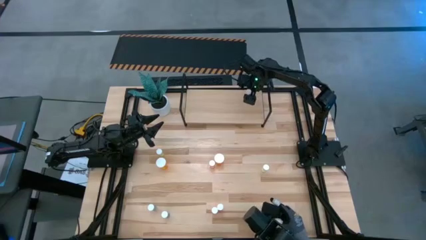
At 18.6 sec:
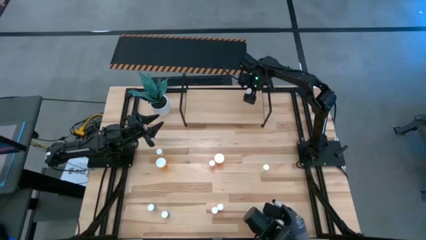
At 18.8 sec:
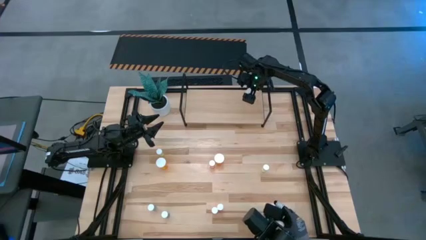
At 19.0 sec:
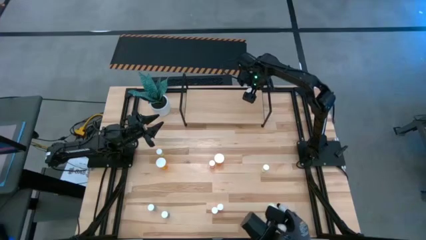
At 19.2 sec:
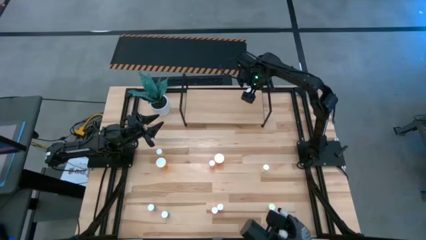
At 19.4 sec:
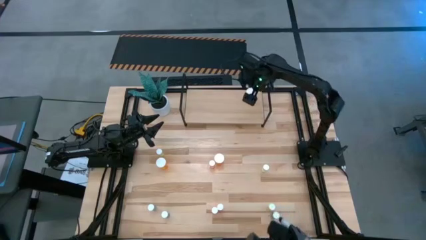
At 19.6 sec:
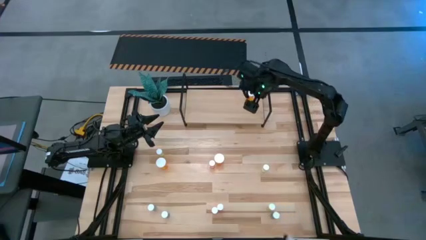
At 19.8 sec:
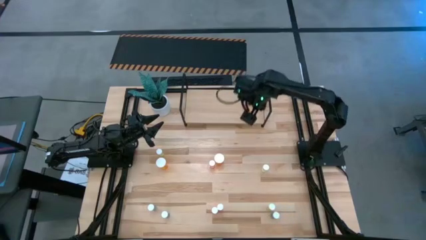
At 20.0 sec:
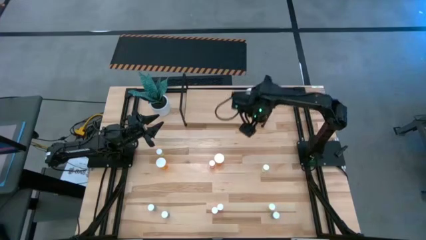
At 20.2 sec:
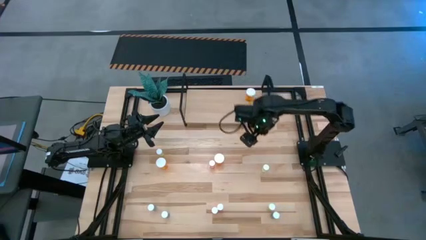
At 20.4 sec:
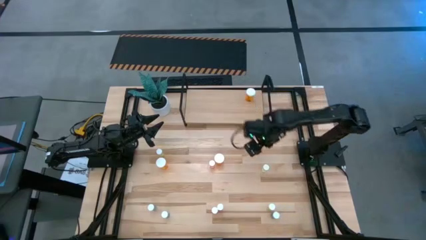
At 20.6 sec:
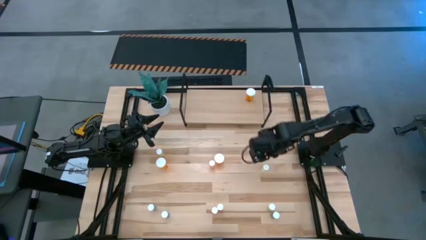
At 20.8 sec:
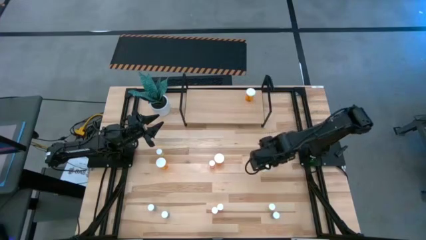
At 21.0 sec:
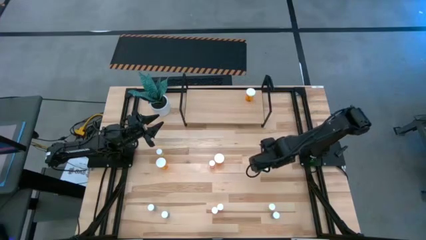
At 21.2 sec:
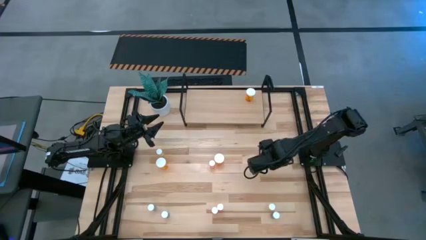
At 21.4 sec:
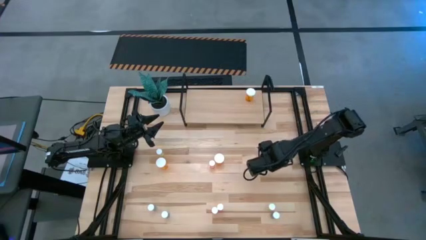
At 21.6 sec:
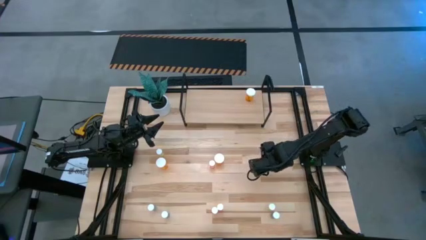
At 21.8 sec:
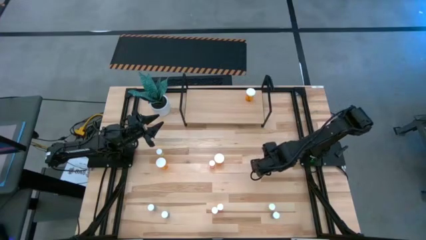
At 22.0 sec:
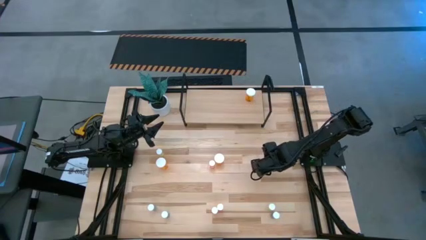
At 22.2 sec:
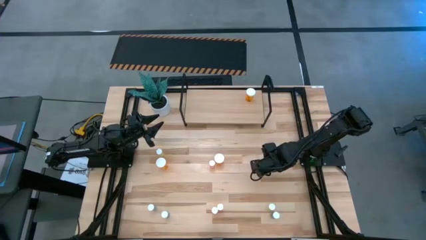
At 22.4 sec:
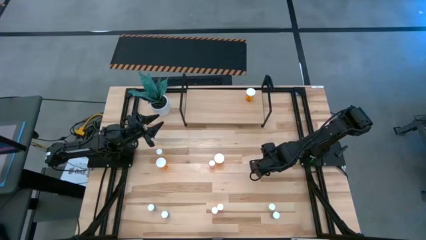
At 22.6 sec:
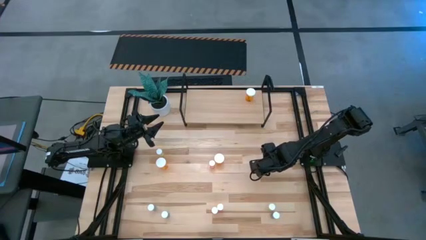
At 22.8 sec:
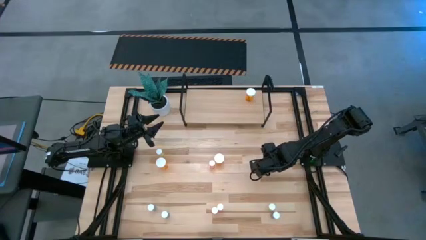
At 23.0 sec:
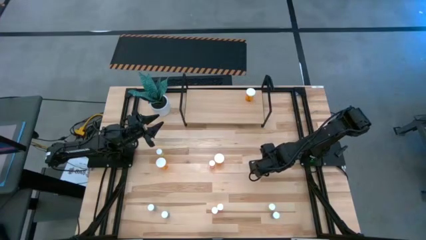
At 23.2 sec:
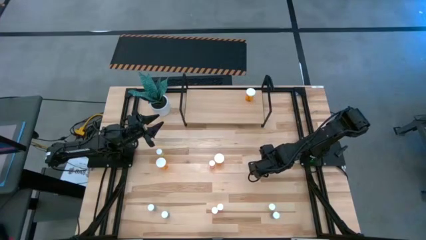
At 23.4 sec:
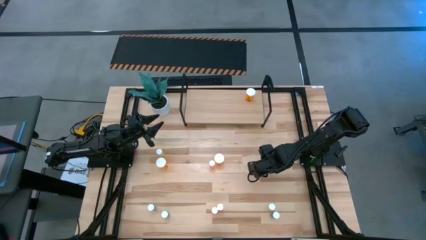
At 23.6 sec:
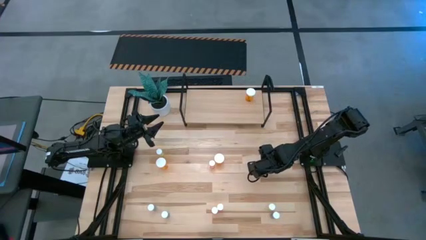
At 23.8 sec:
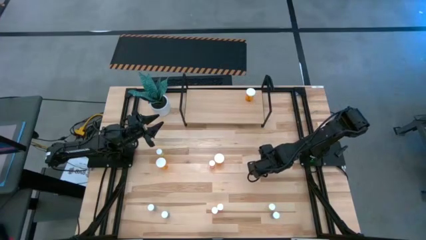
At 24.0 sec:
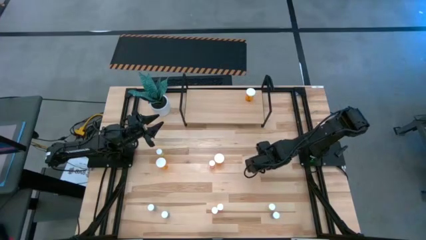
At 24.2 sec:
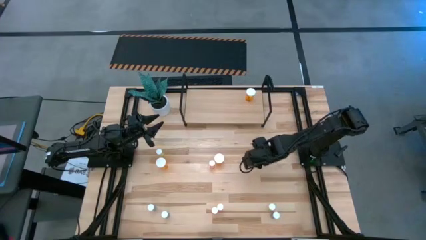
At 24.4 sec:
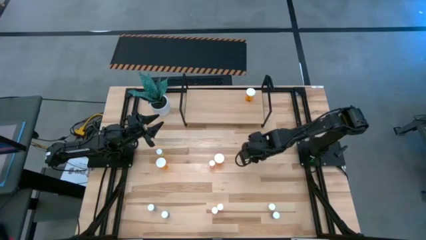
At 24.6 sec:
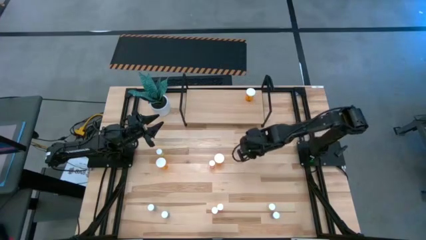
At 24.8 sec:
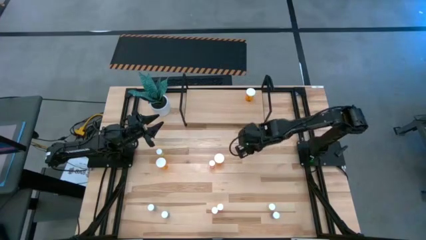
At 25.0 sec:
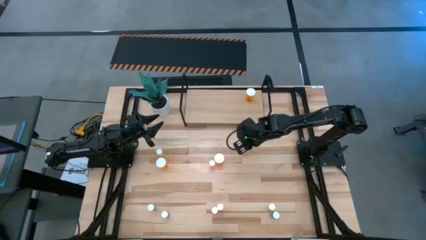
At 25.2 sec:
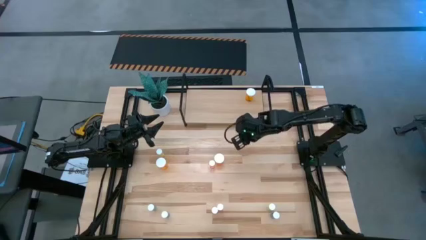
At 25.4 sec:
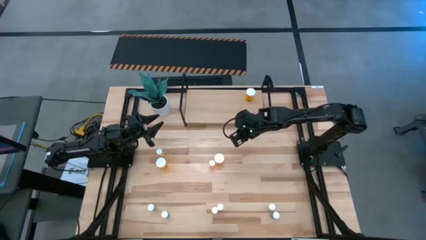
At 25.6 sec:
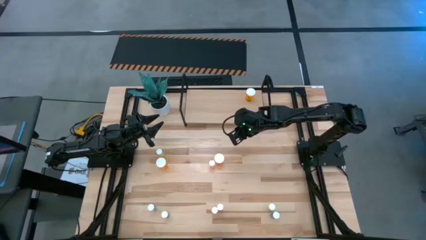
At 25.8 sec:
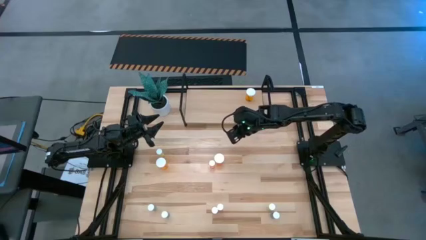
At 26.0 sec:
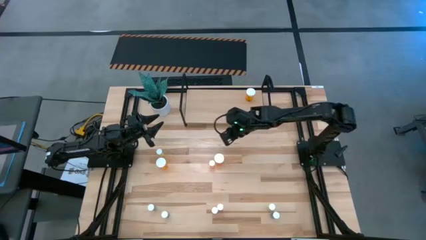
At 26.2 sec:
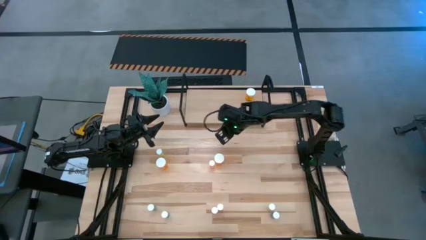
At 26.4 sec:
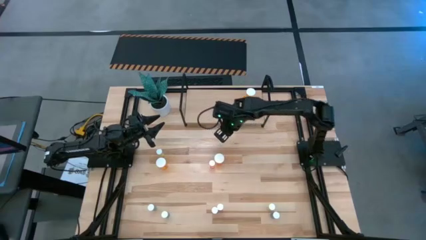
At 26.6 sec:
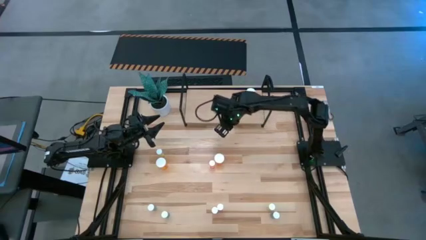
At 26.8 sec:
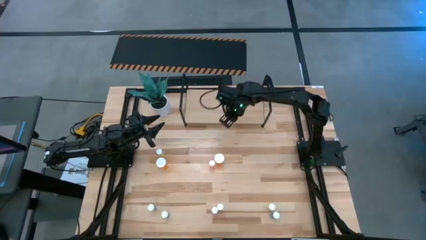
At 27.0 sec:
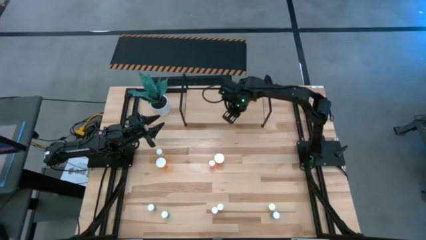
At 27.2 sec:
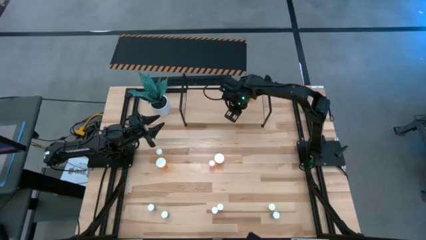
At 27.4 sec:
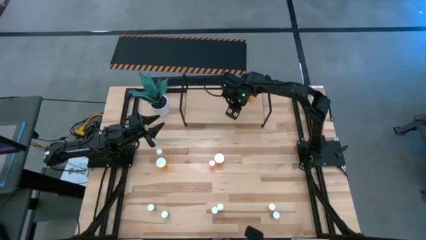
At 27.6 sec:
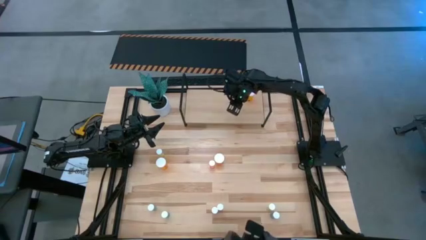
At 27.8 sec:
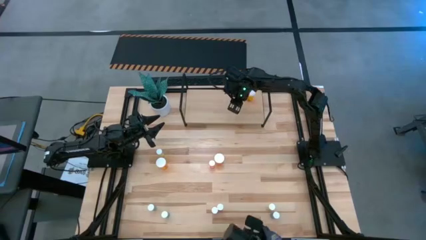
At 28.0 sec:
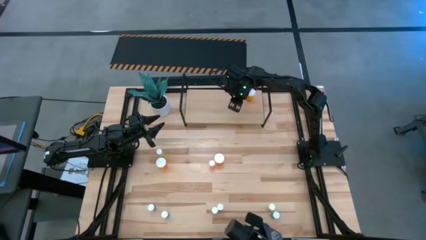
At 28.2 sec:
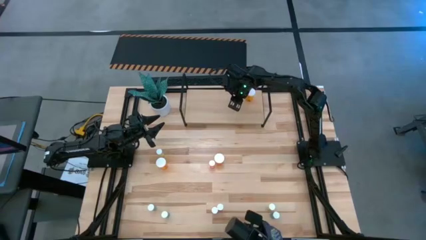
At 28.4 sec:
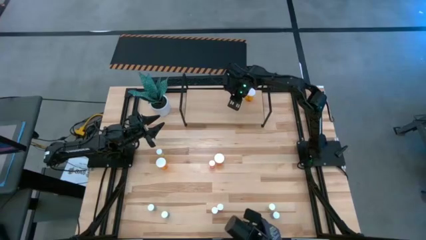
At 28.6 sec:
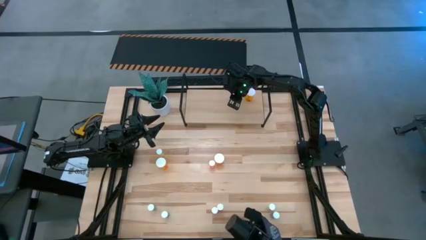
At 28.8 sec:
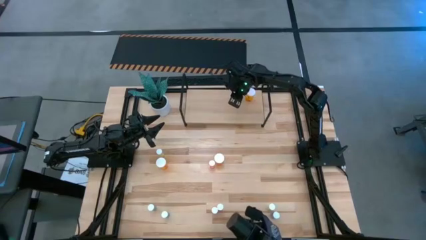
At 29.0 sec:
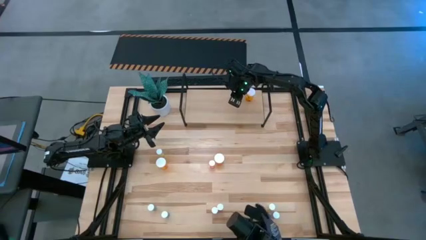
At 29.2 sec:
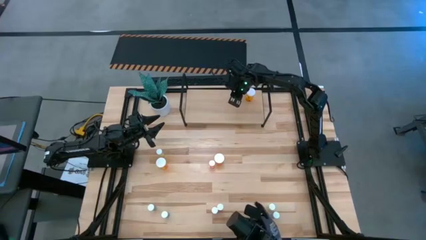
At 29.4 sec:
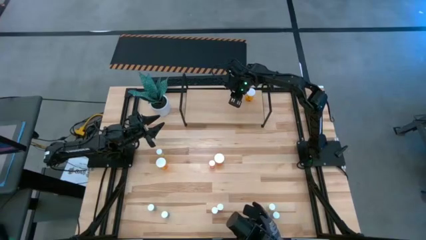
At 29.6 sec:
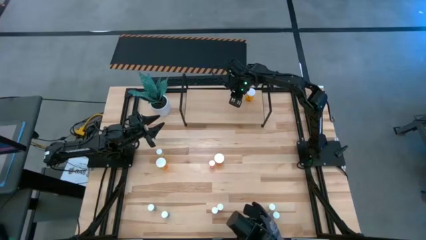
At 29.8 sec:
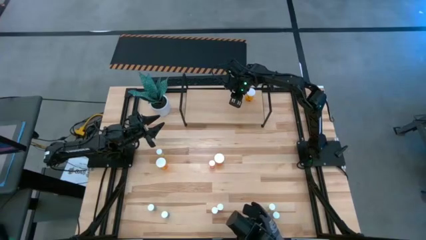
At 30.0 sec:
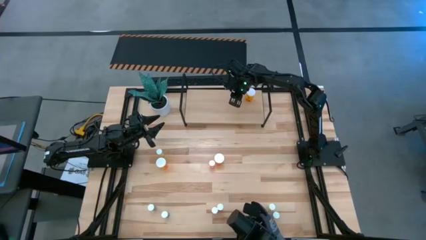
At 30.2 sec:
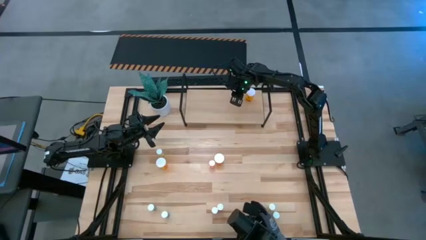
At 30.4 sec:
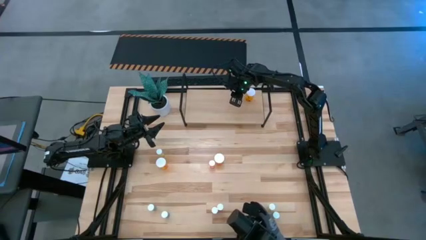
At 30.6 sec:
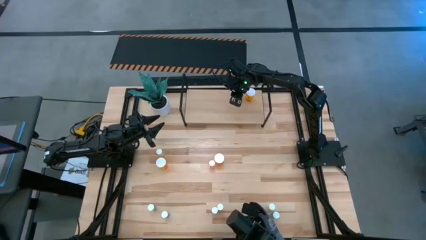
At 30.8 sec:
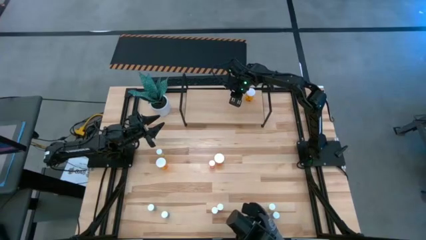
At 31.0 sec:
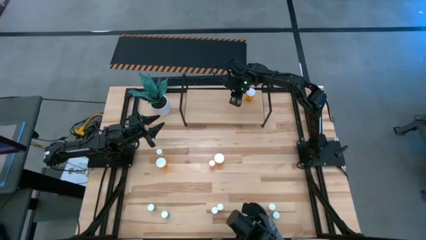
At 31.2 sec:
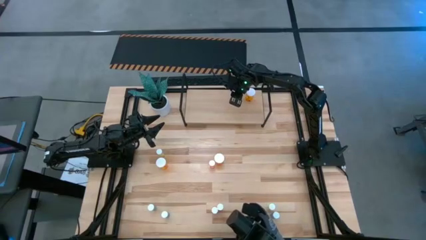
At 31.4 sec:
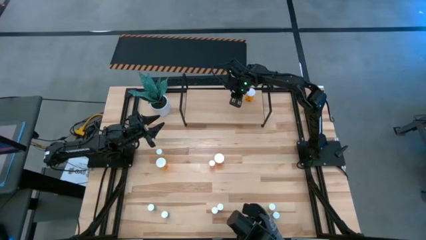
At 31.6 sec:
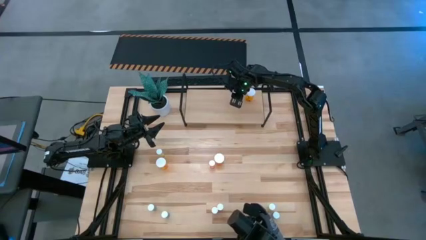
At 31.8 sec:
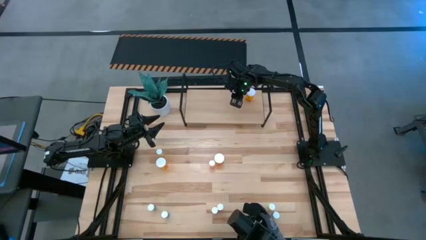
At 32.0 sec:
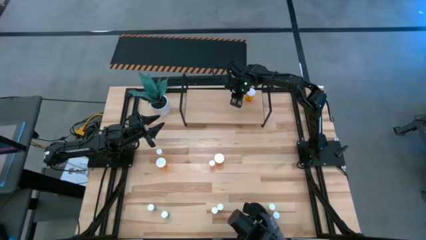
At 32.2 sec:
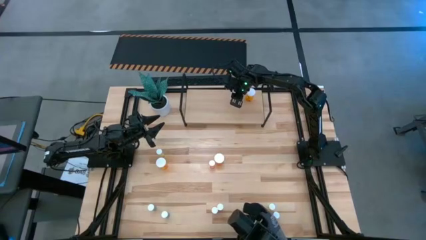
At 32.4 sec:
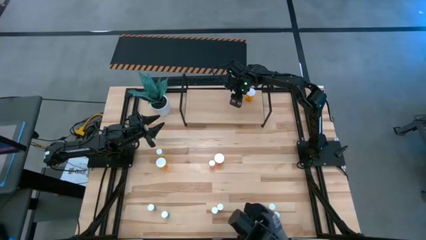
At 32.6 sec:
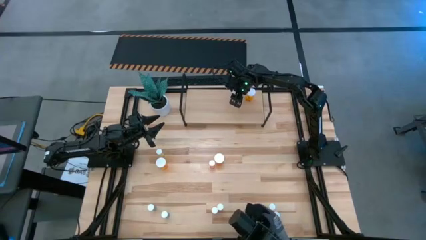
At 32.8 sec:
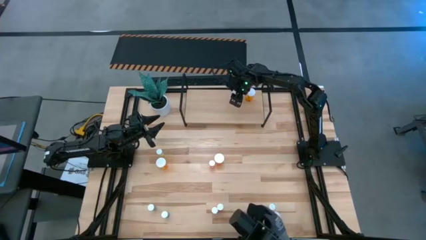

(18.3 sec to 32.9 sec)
Task: Pick and place medicine bottles onto shelf by color
Put the yellow pill bottle on the shelf

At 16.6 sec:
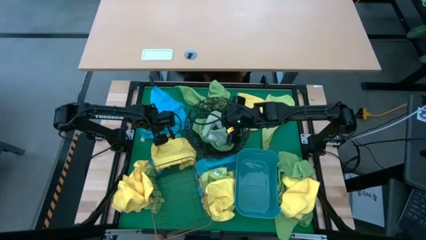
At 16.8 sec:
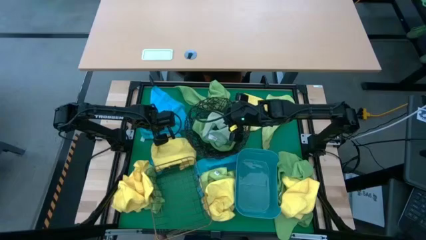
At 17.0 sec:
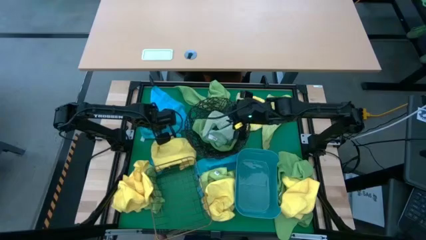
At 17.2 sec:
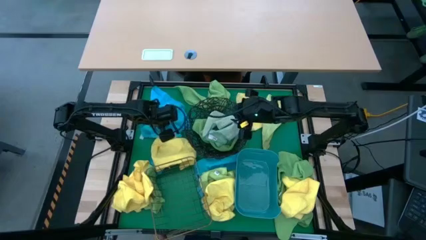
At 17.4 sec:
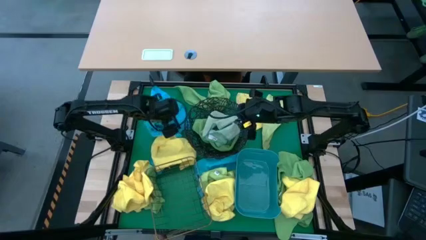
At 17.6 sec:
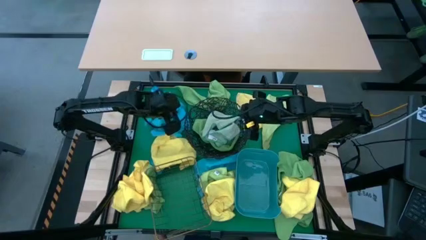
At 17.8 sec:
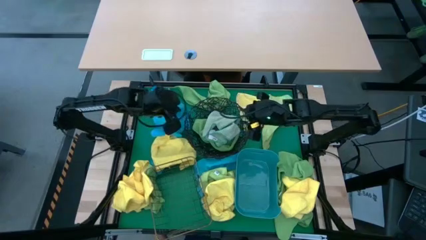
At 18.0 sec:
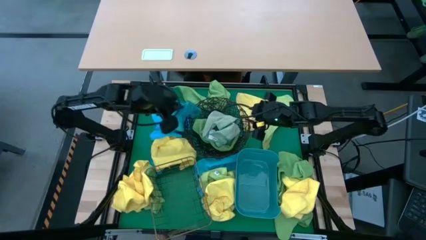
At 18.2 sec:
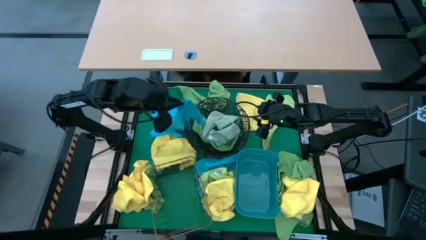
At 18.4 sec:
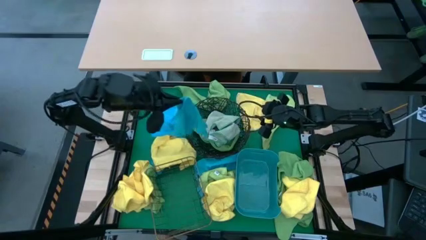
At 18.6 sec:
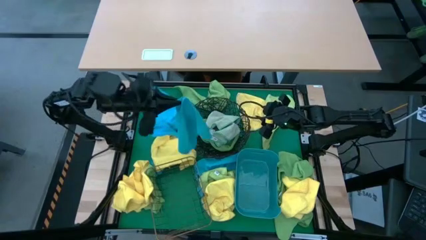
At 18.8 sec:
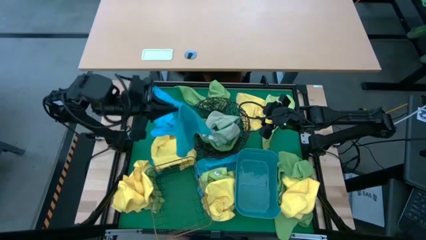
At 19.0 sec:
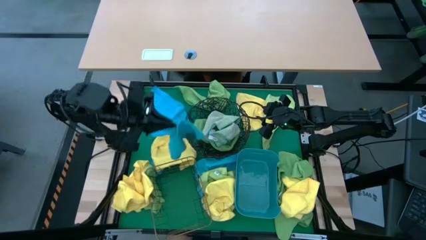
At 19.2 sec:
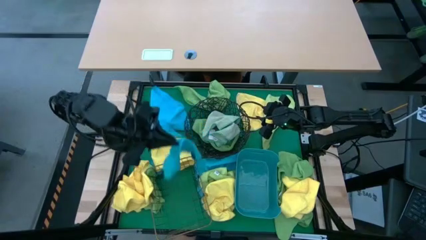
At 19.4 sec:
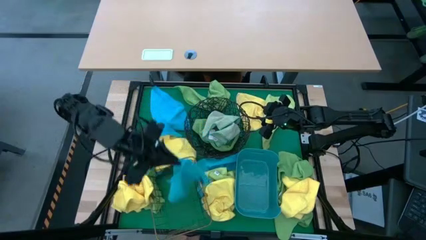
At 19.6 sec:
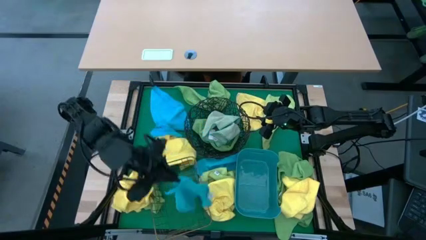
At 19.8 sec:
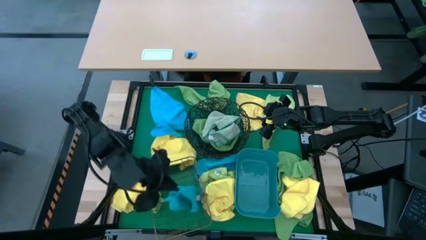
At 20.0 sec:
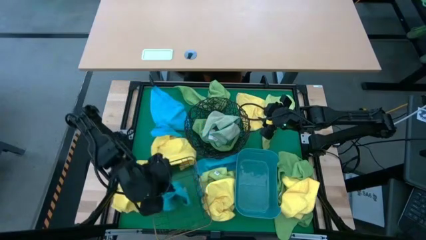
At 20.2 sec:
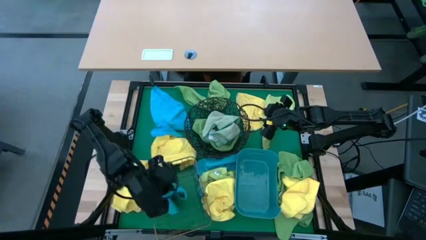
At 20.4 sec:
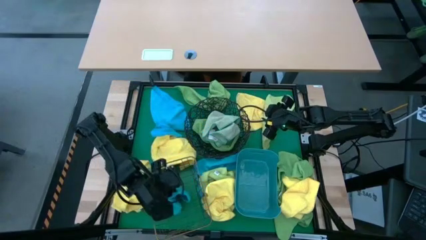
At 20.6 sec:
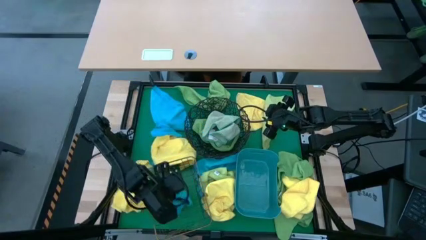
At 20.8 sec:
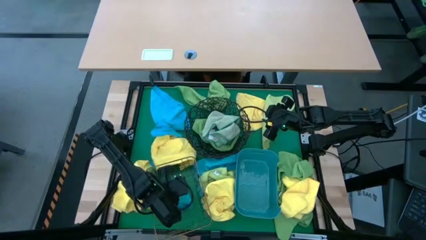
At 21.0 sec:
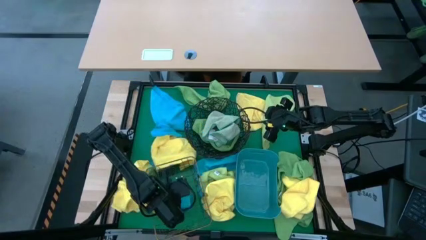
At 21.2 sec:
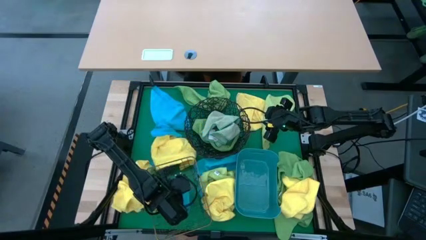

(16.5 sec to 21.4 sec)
Task: Sort microfiber towel by color & place in baskets
Put the blue microfiber cloth into the wire basket
